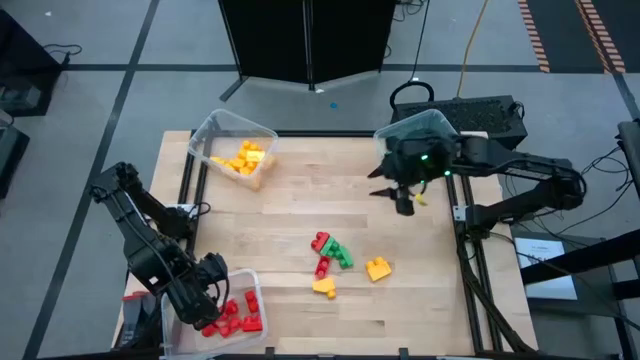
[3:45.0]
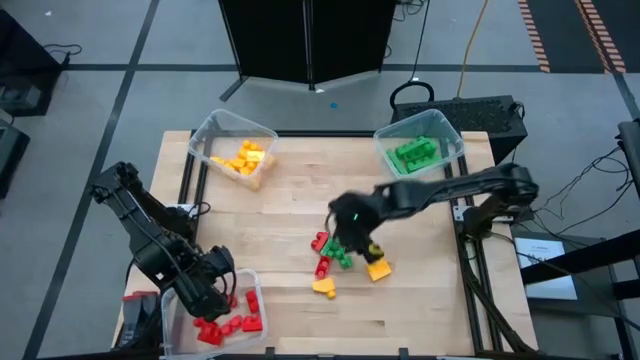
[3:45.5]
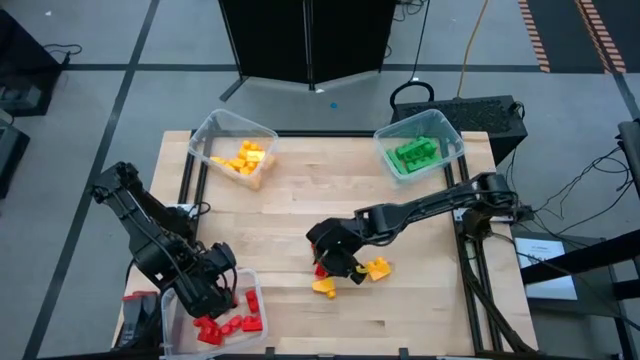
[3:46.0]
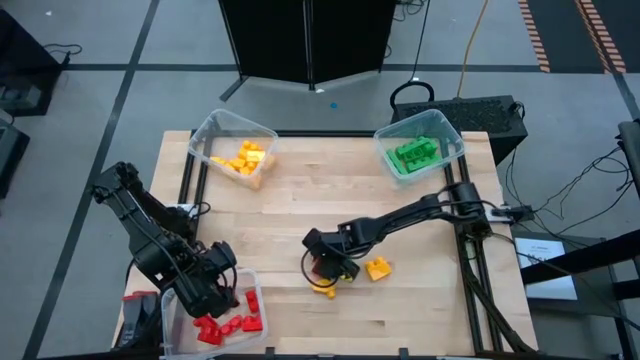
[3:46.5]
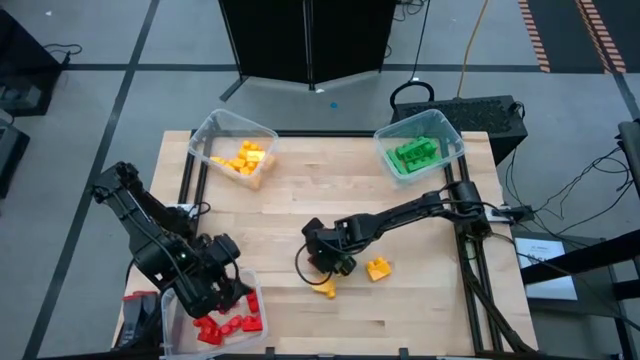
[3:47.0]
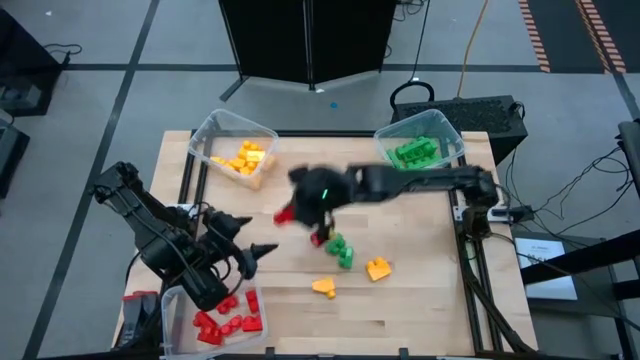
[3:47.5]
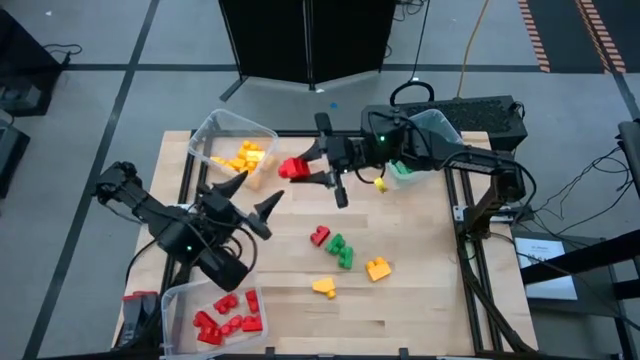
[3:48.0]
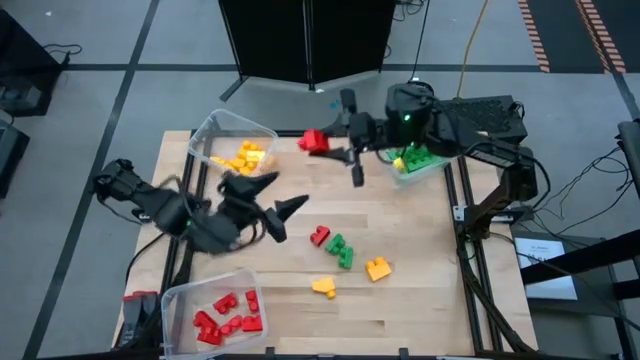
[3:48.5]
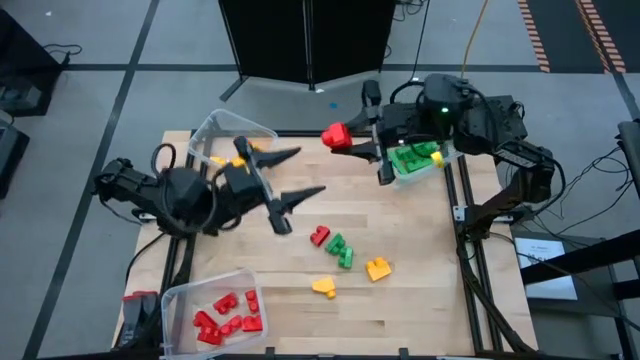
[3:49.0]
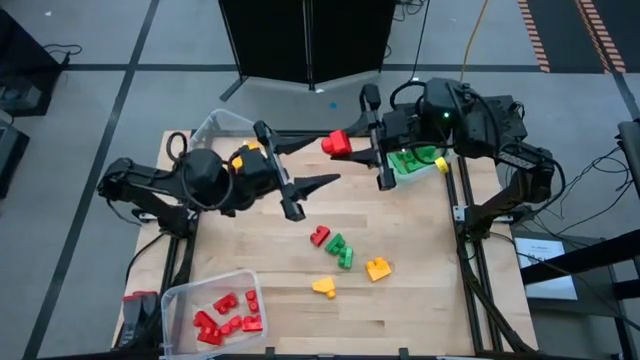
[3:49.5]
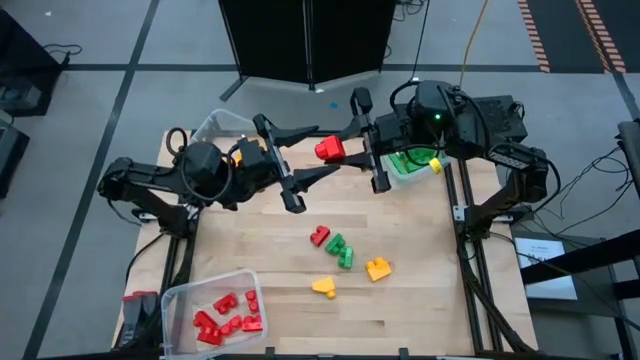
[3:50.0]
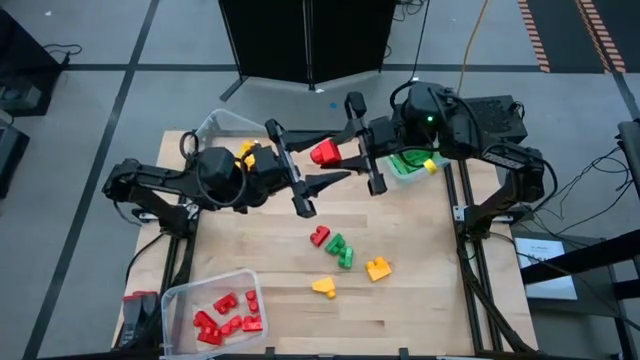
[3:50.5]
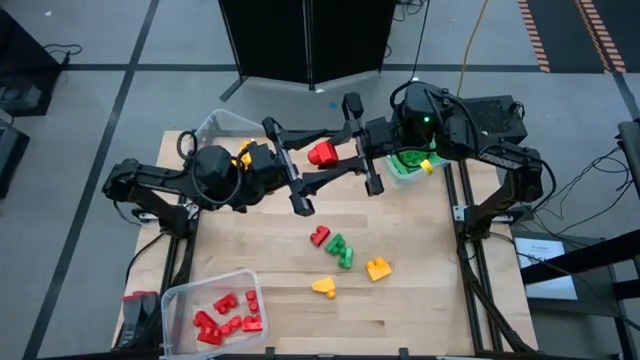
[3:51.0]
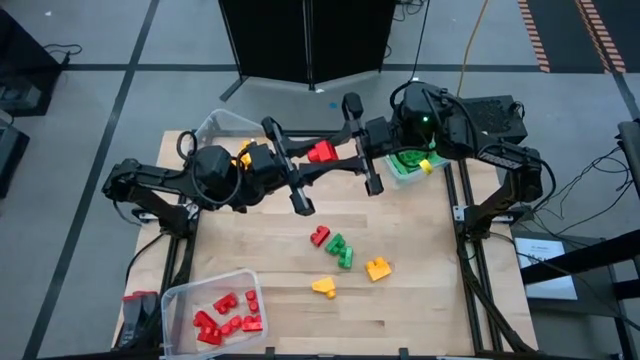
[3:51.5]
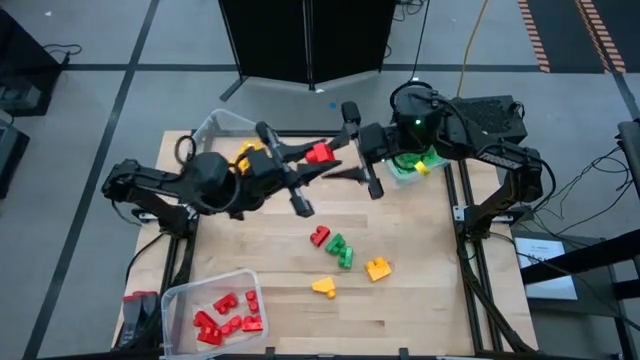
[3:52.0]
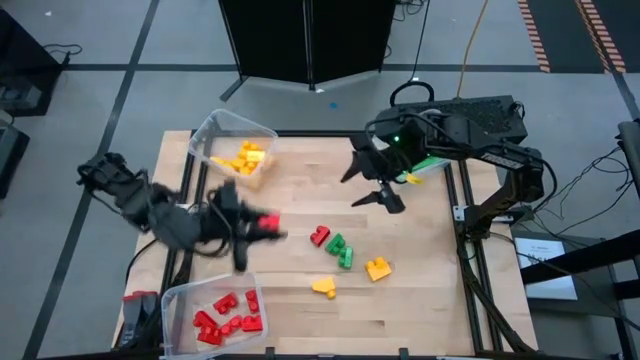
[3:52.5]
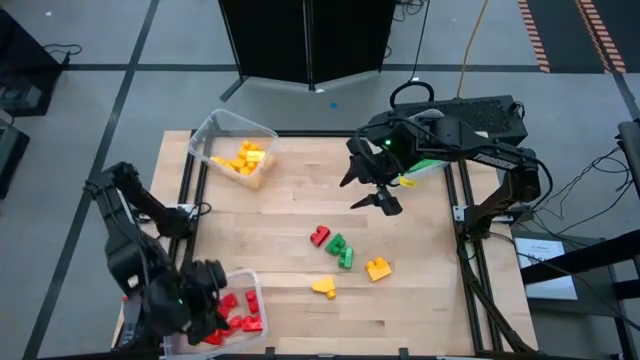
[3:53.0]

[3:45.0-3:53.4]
Task: Sort blocks
Put the red game piece into the bottom transparent bin

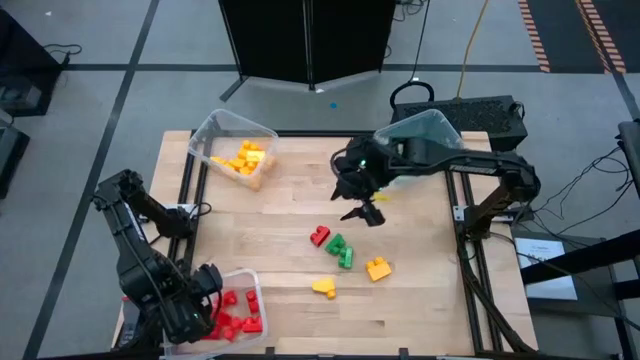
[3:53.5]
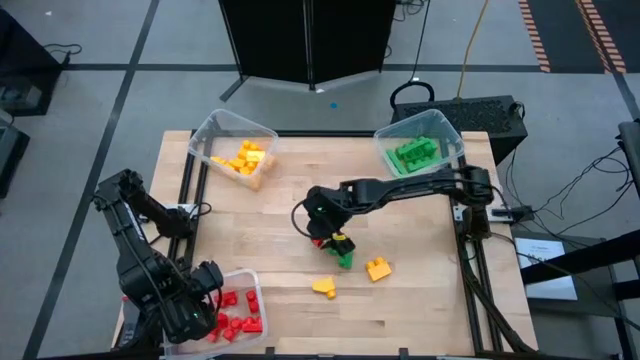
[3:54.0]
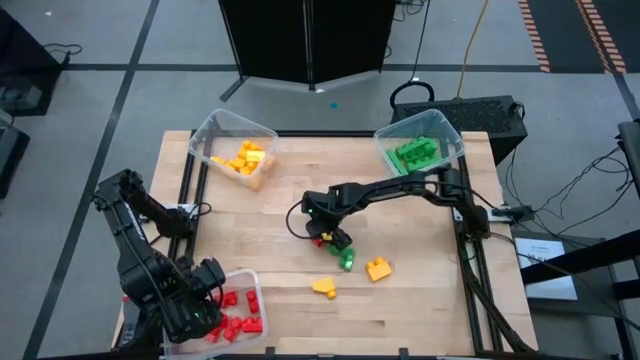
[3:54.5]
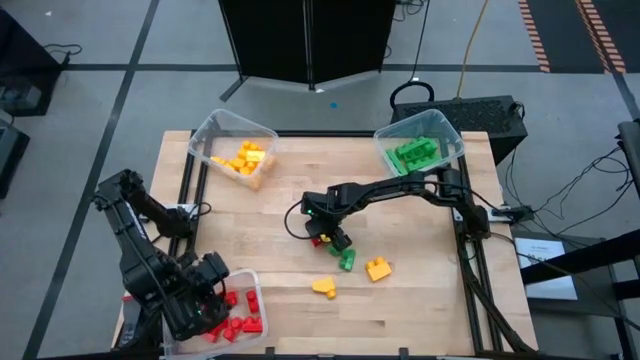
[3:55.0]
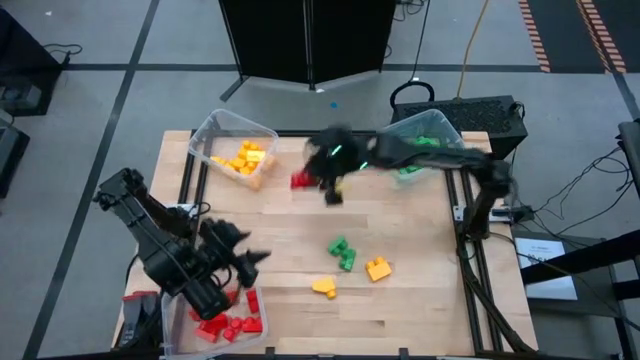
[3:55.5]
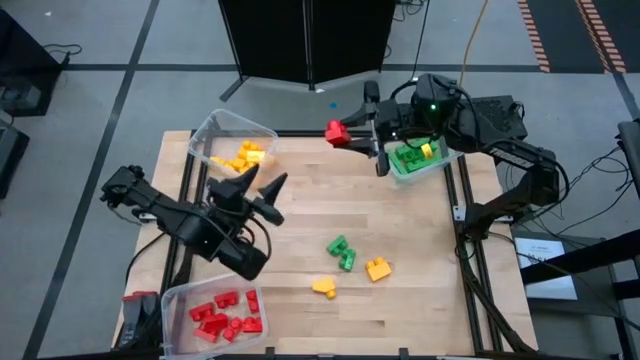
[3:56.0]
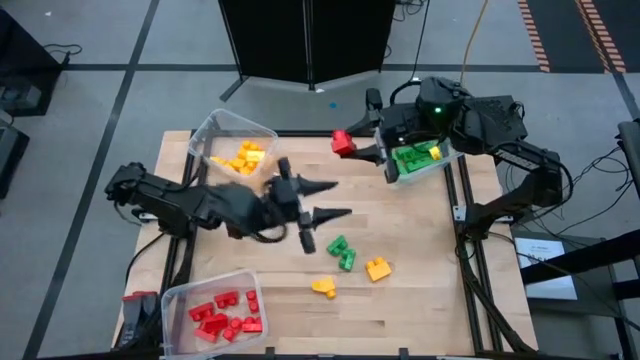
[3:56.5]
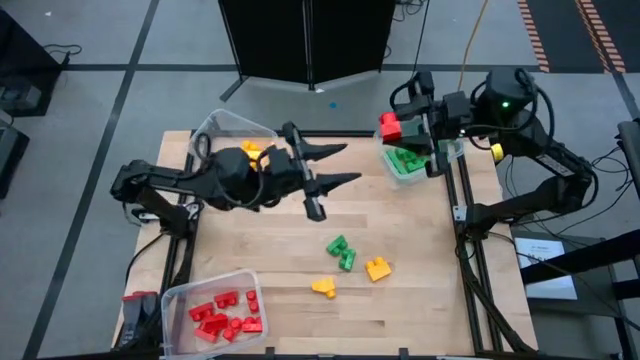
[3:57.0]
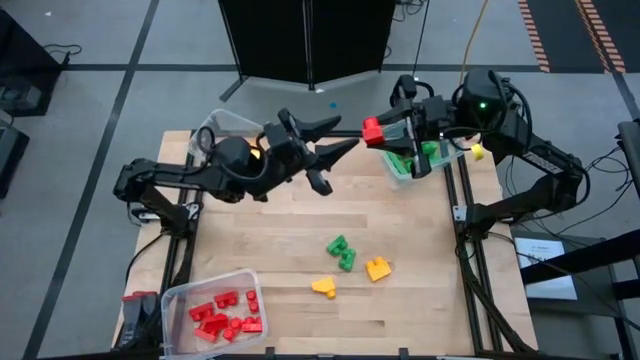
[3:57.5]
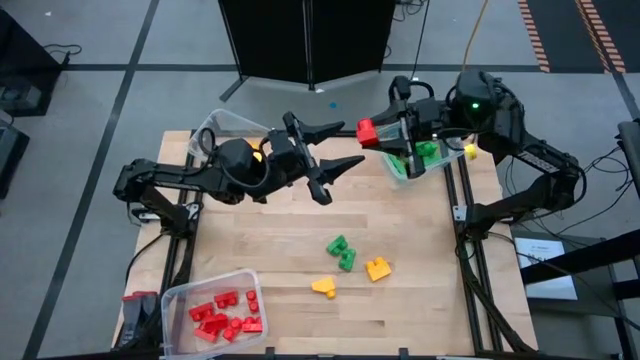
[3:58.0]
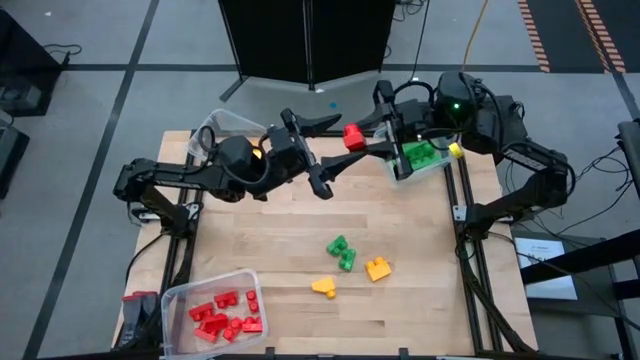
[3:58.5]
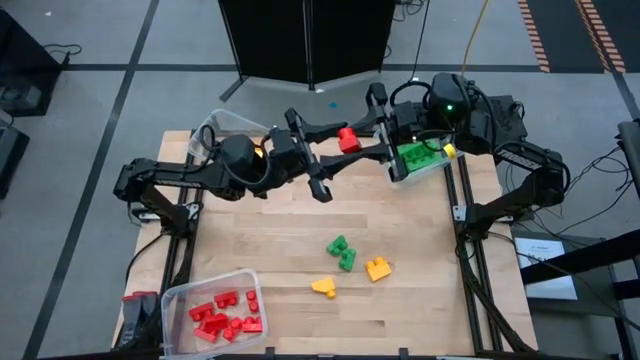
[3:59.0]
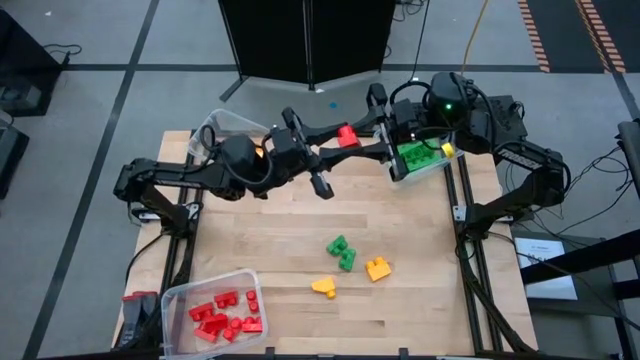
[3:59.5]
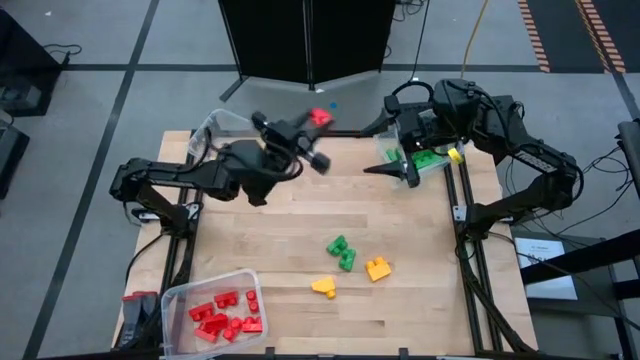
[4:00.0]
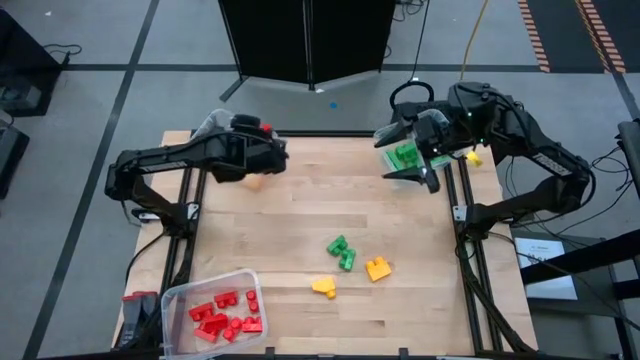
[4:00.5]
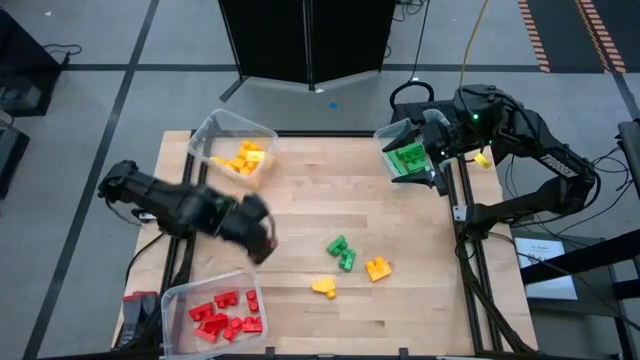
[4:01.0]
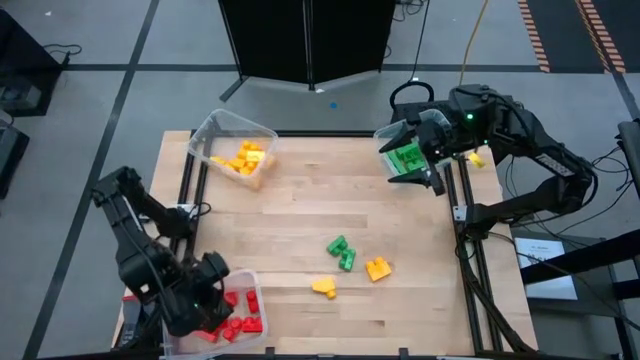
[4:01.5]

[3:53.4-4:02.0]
Put the red game piece into the bottom transparent bin

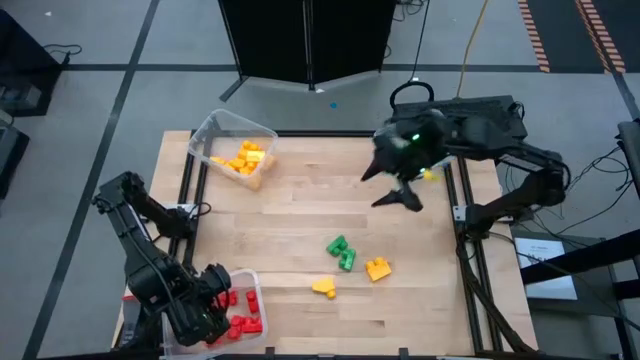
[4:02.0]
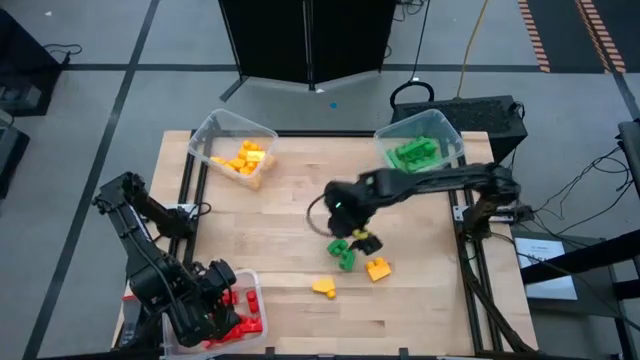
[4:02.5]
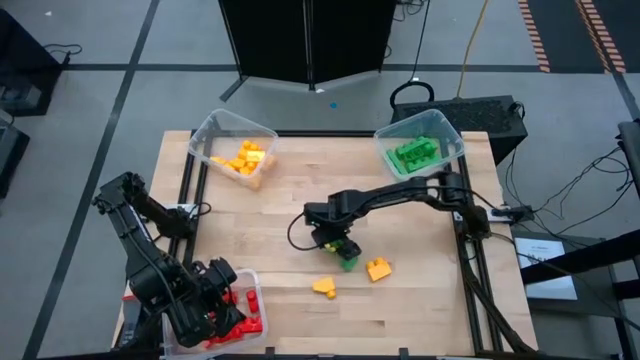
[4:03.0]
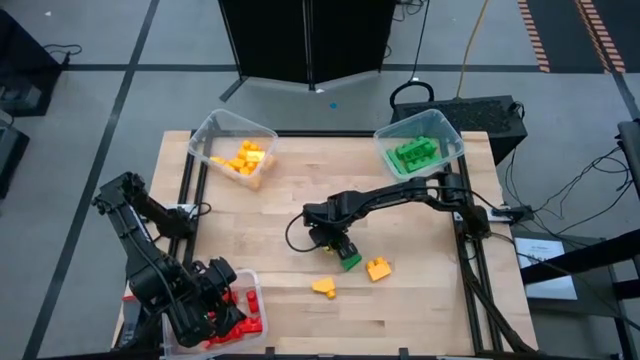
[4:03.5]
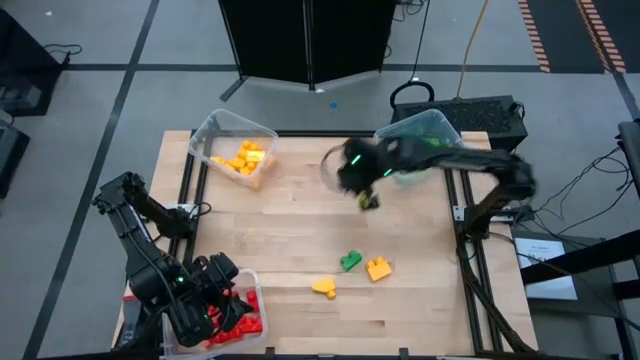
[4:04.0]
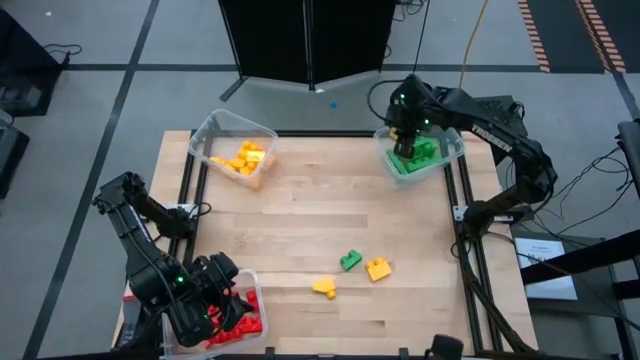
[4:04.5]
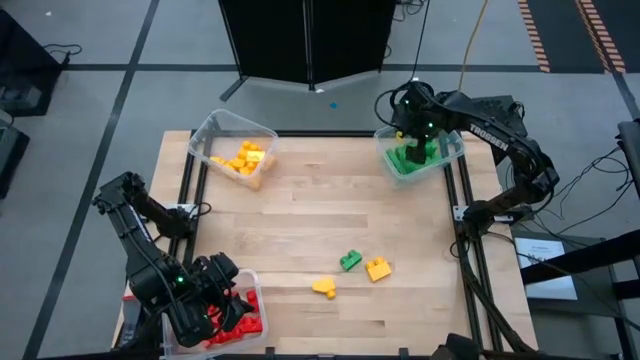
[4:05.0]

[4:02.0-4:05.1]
Put the green game piece into the top right transparent bin
